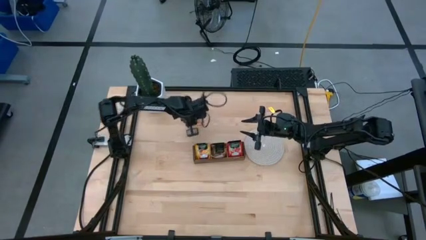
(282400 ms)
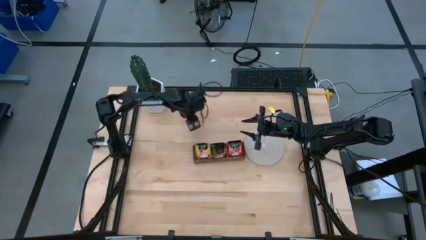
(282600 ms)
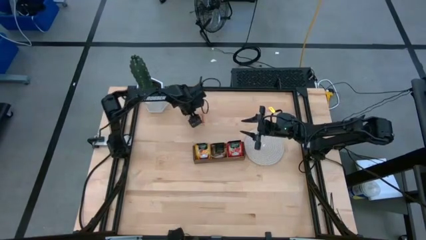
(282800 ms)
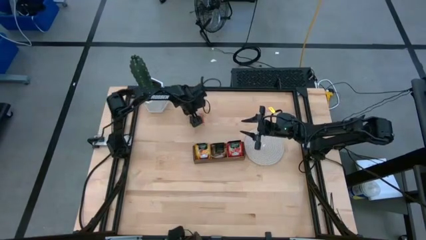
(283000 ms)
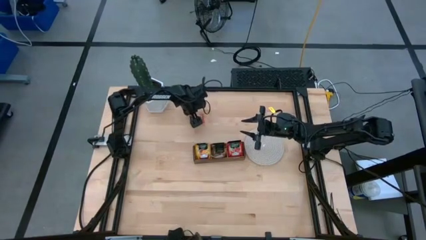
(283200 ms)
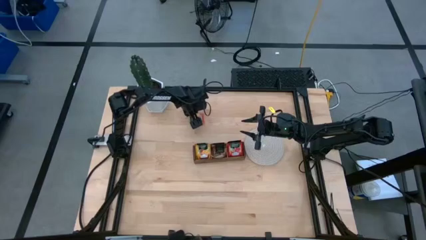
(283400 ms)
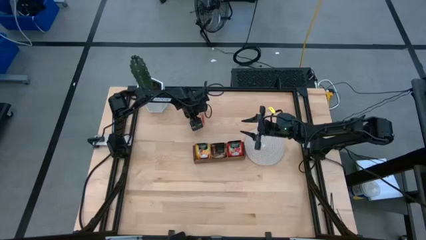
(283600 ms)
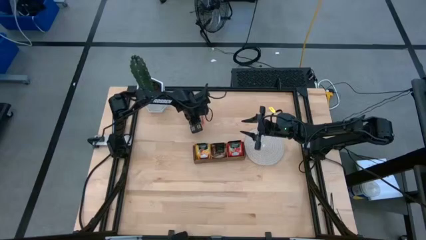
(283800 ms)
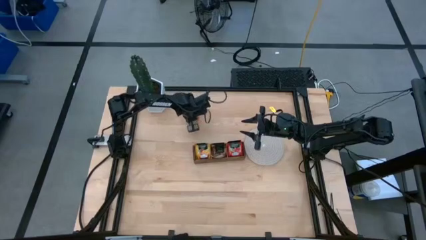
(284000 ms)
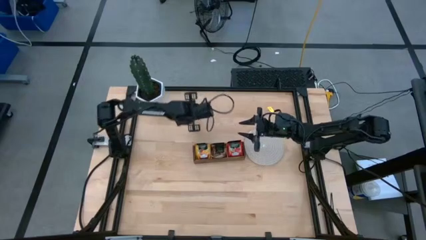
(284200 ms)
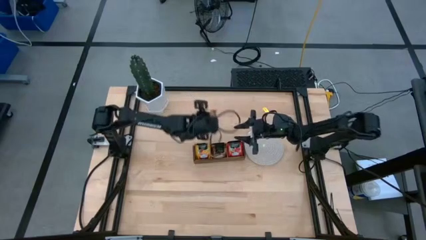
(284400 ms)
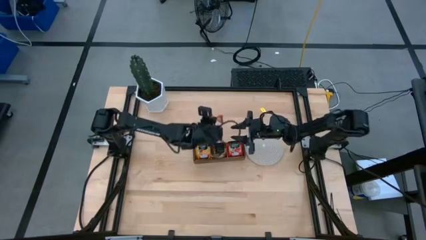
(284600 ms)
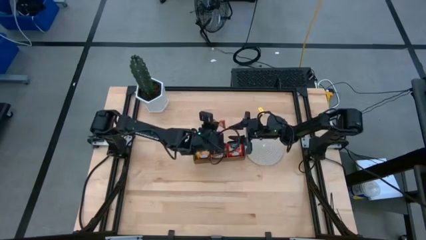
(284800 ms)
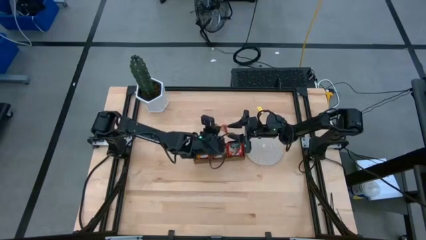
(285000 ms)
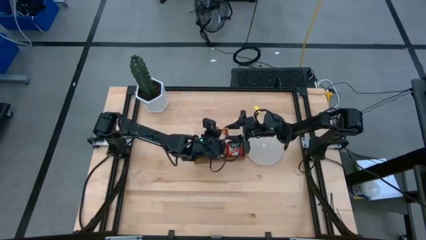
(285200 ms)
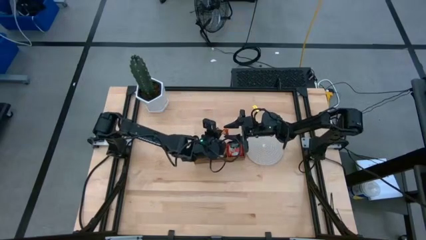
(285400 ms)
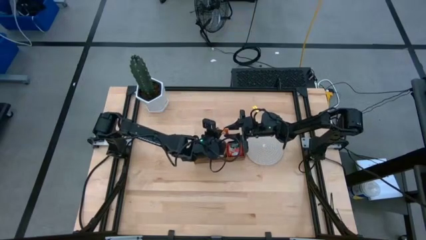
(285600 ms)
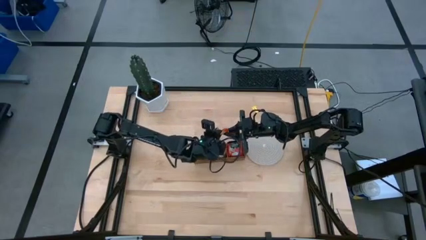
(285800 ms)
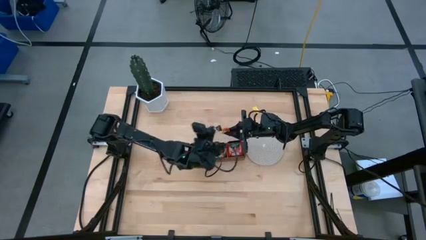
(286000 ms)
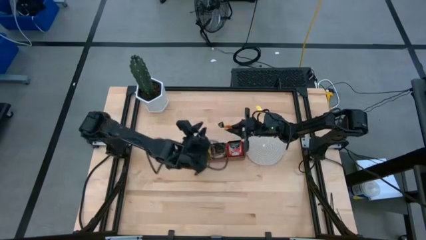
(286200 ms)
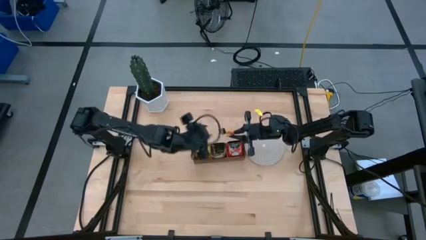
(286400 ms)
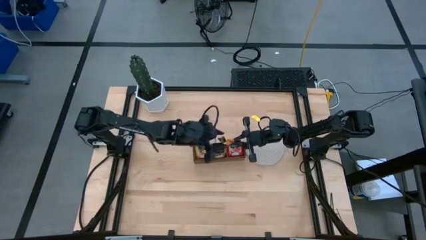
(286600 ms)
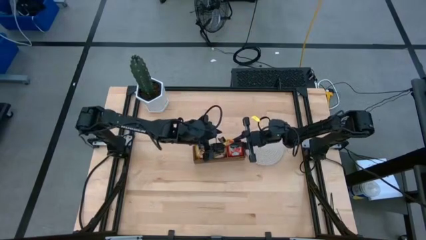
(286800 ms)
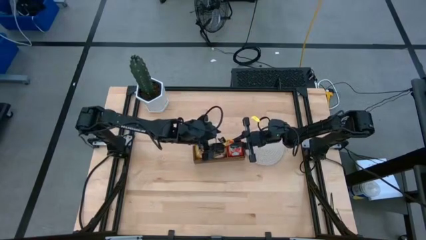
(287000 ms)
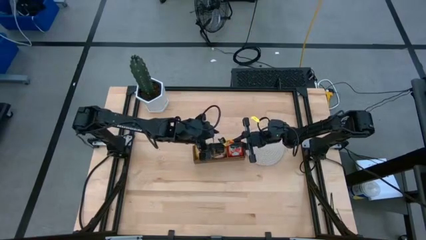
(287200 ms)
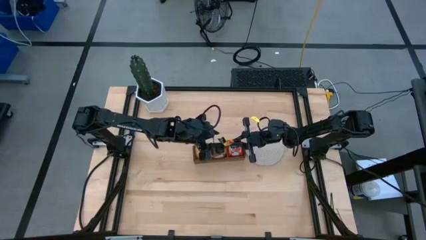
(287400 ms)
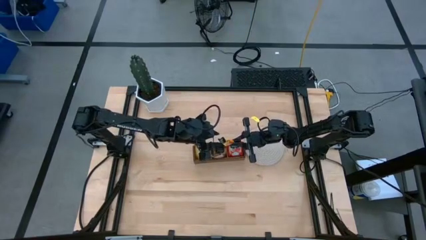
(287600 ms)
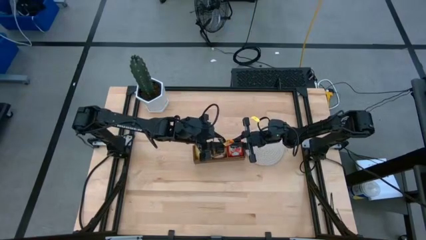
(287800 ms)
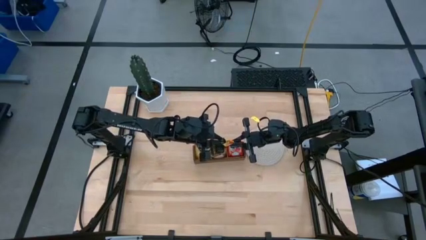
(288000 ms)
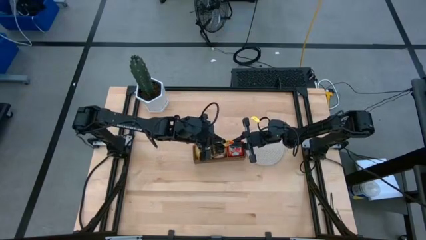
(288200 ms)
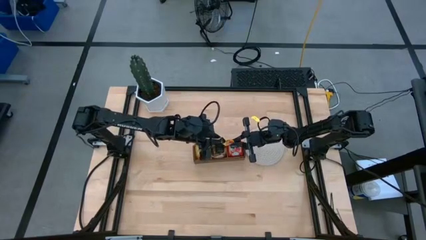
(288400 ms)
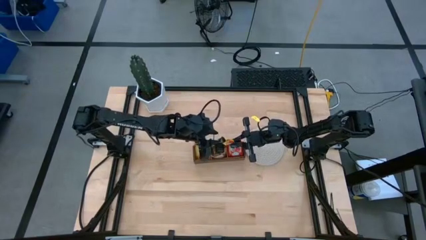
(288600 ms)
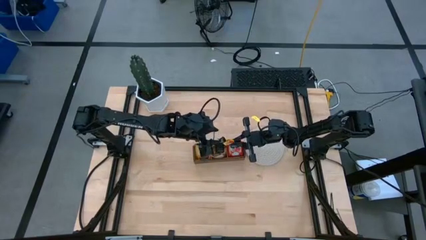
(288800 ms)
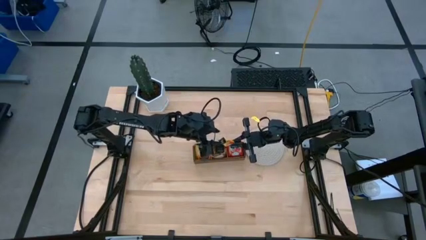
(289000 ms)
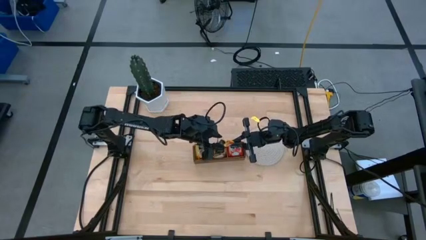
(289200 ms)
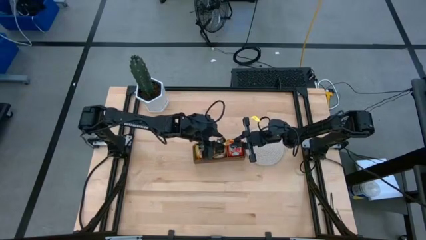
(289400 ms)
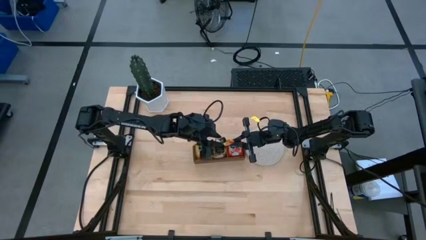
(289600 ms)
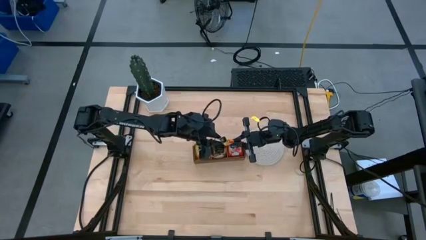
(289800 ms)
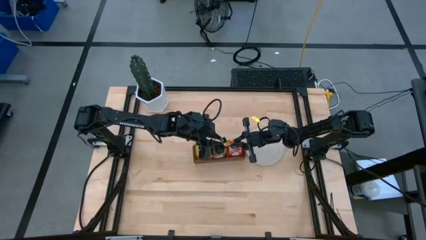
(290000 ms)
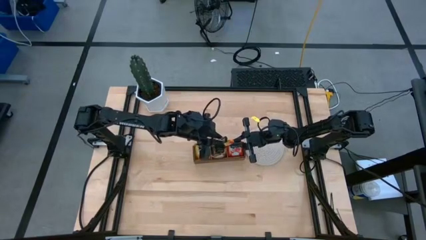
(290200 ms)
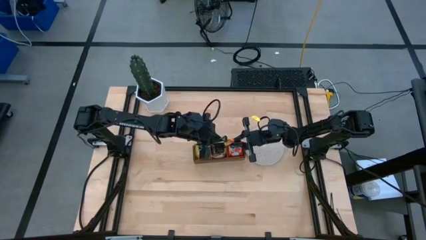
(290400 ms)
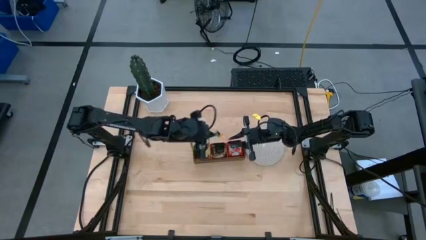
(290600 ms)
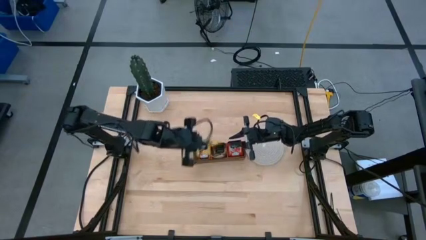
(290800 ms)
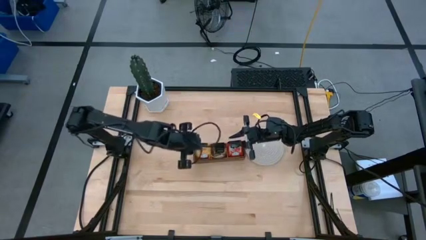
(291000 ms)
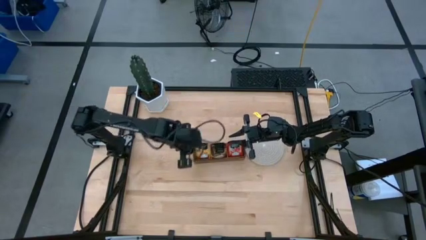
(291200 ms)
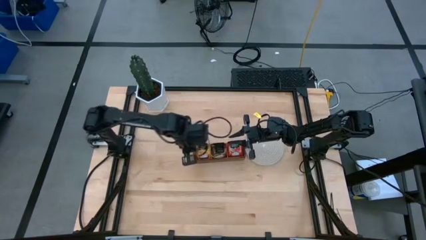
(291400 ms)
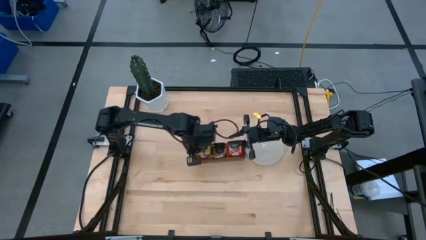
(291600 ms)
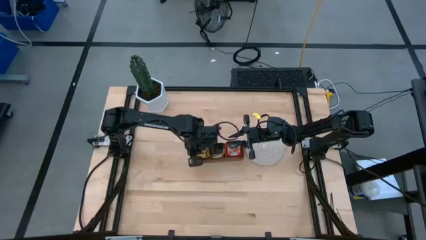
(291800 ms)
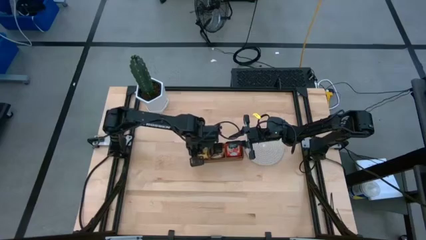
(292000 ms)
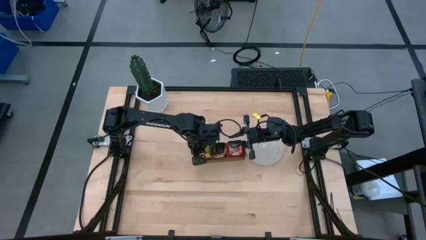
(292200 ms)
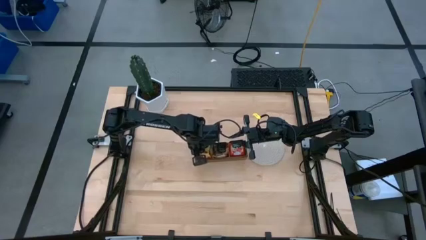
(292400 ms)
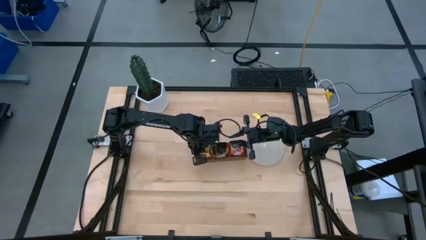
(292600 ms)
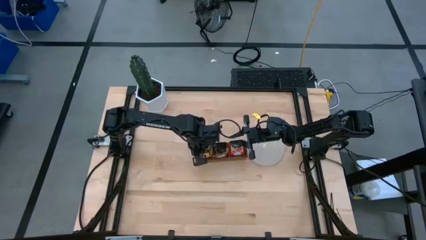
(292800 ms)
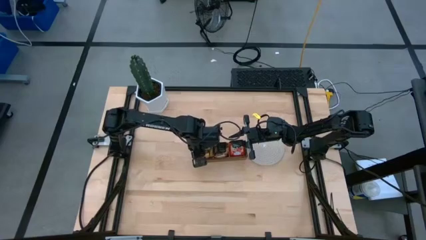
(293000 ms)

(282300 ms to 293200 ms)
Task: Pick & Place Tea
Put the yellow tea bag into the left section of the wooden organizer

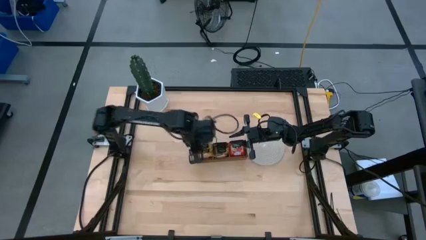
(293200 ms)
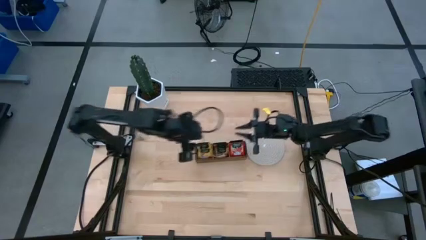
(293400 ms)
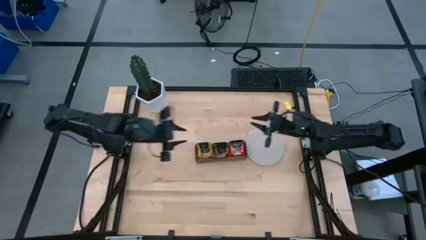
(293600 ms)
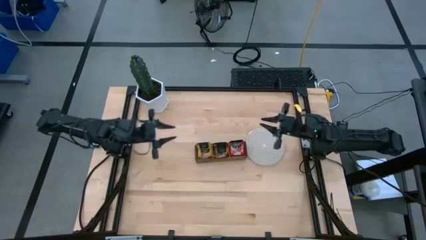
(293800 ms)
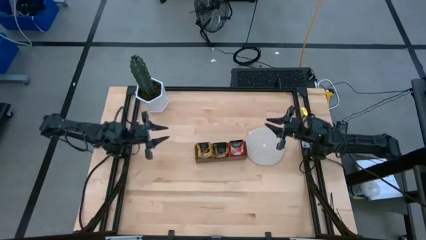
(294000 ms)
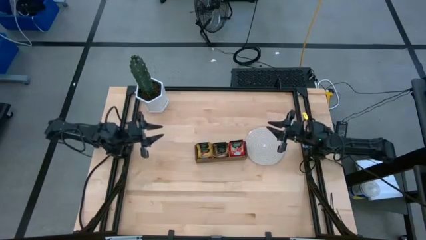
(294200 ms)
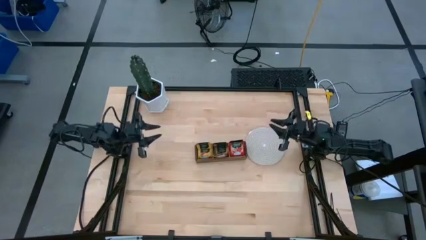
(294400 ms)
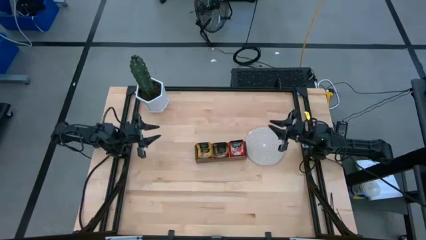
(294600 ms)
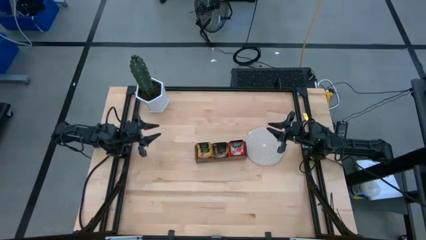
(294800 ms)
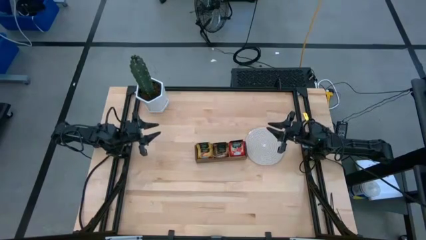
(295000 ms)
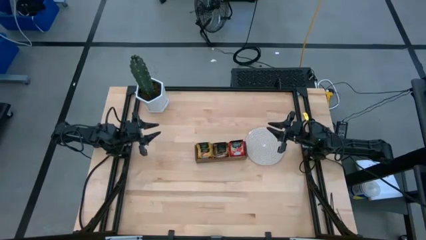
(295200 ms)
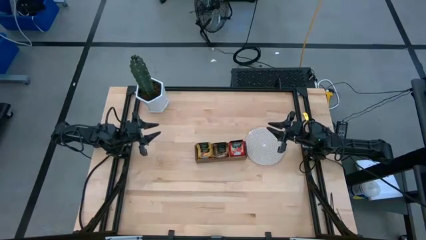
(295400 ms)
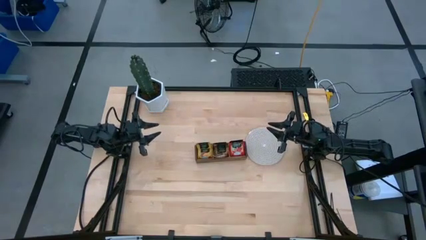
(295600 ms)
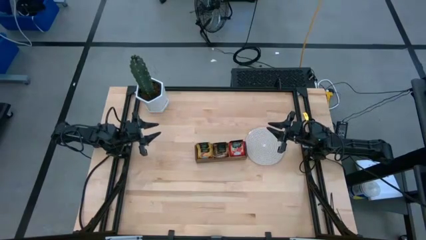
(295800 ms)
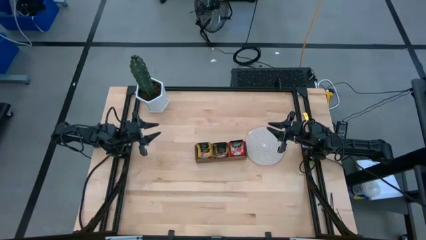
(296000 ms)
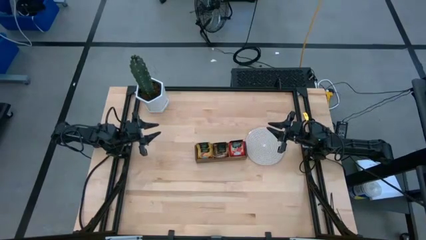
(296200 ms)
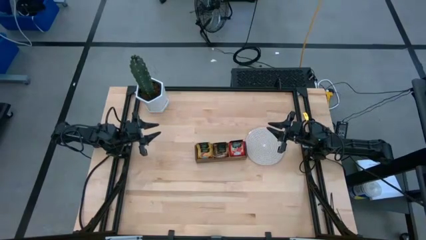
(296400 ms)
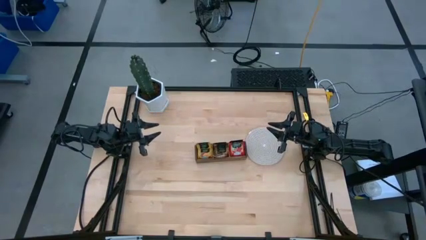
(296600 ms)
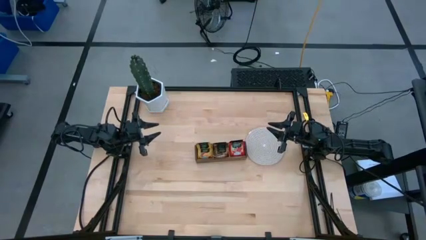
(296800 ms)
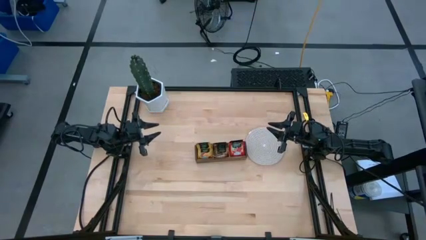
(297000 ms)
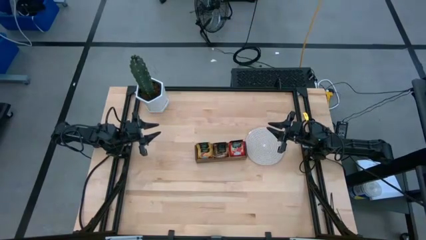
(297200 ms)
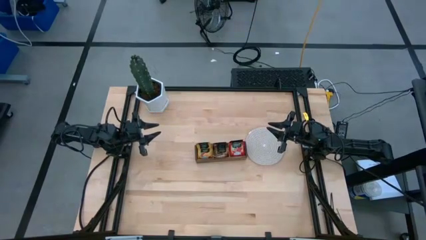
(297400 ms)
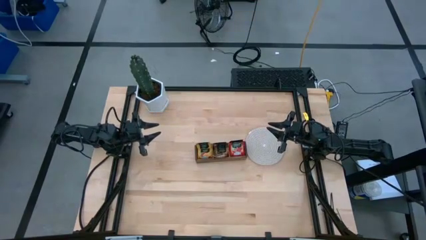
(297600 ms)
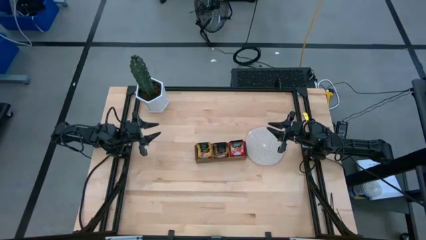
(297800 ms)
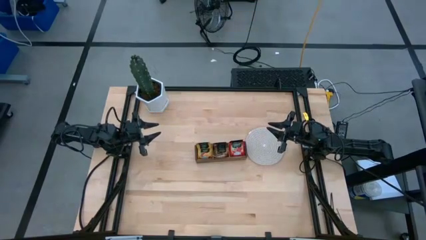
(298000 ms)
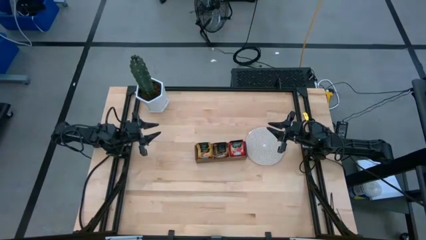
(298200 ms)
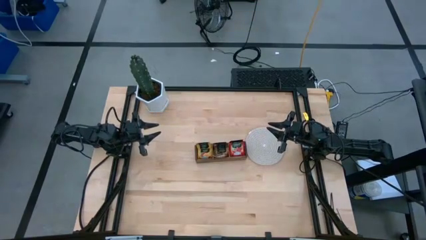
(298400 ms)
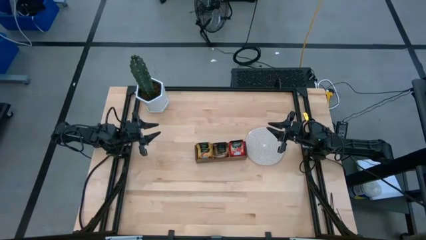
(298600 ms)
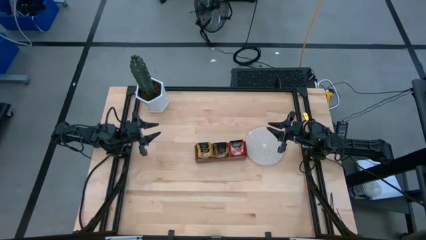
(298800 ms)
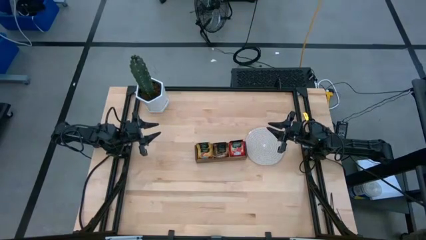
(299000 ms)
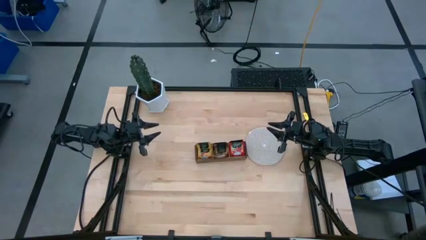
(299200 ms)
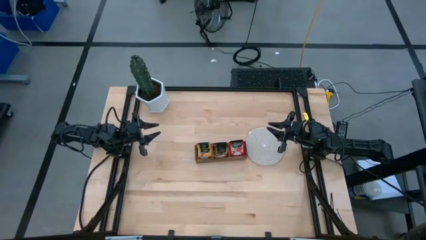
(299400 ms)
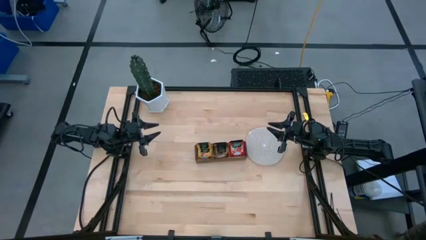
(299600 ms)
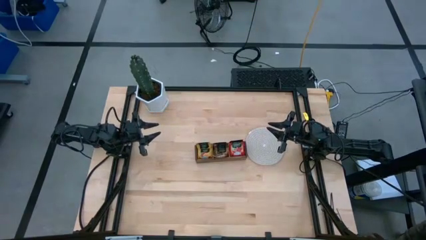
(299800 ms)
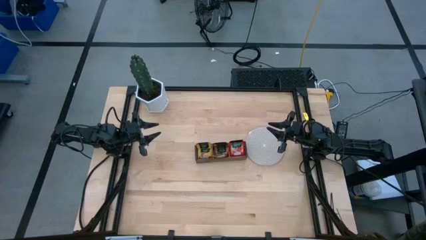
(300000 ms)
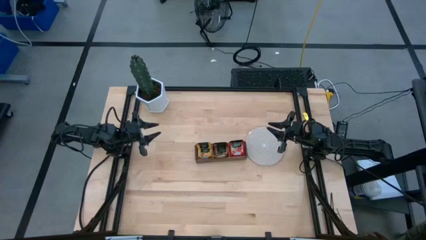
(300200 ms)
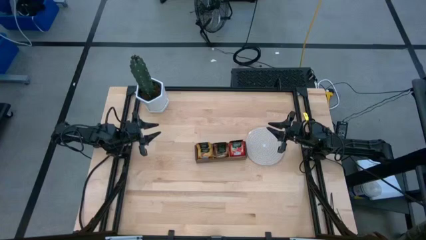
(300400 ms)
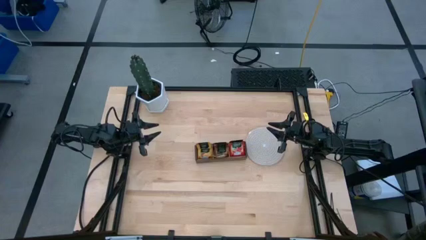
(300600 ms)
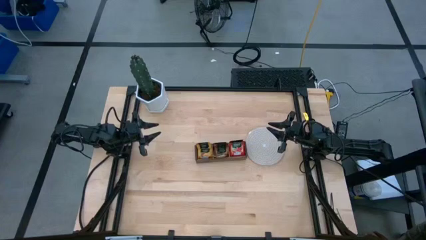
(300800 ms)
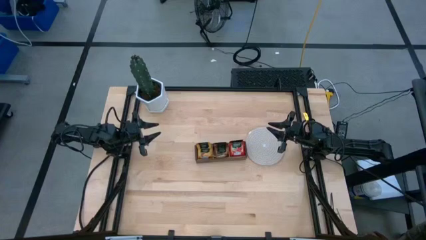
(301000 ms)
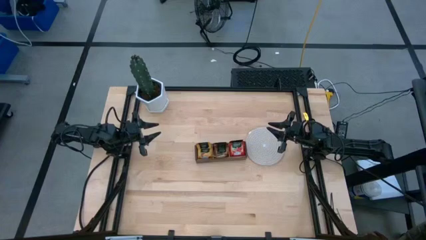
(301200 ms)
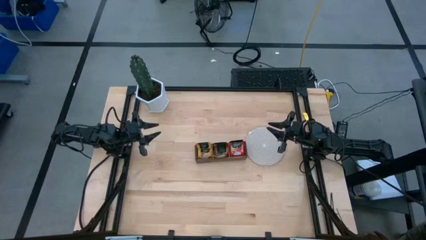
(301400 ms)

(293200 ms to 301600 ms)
Return to Home Position
